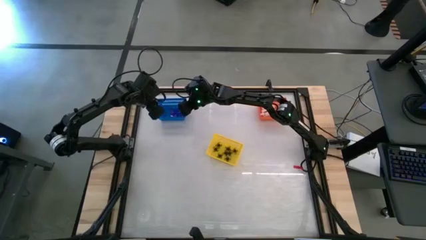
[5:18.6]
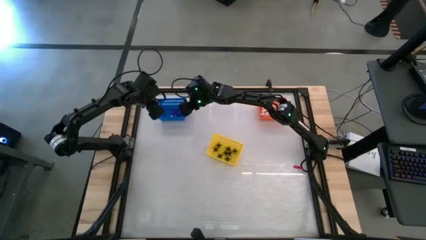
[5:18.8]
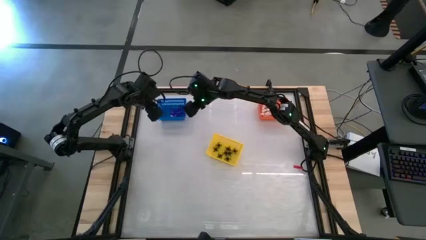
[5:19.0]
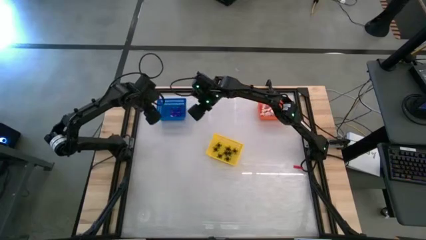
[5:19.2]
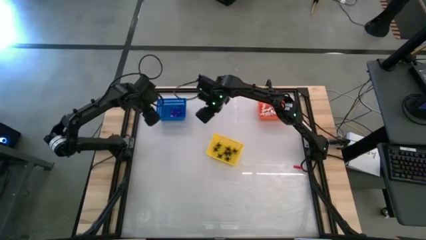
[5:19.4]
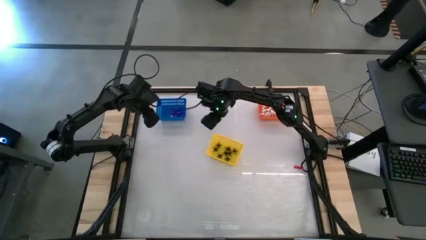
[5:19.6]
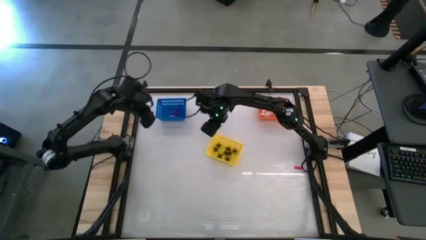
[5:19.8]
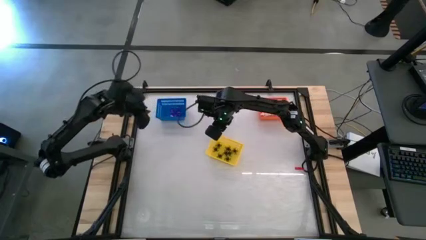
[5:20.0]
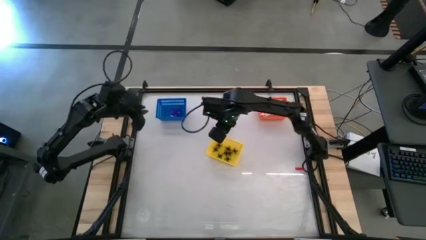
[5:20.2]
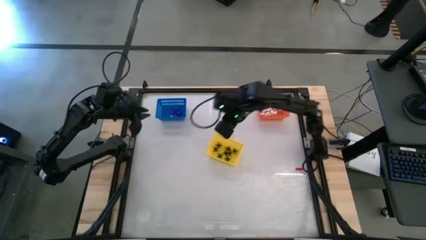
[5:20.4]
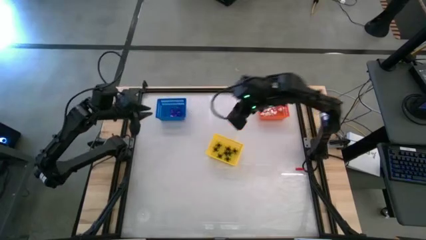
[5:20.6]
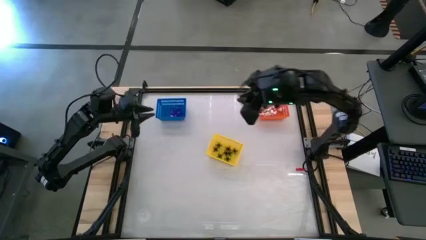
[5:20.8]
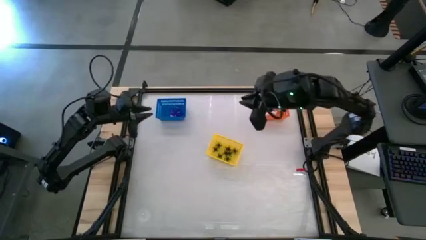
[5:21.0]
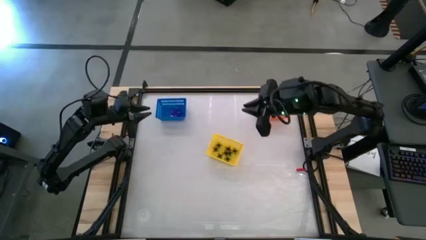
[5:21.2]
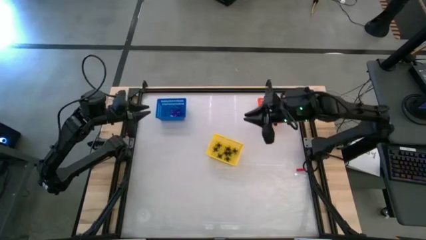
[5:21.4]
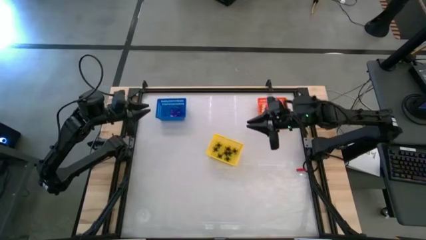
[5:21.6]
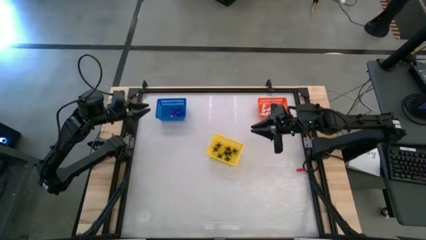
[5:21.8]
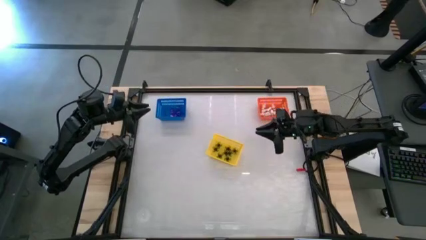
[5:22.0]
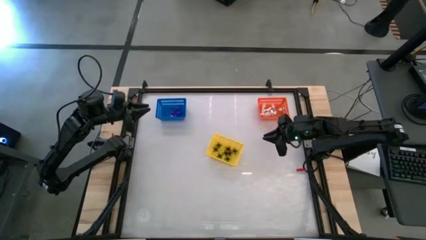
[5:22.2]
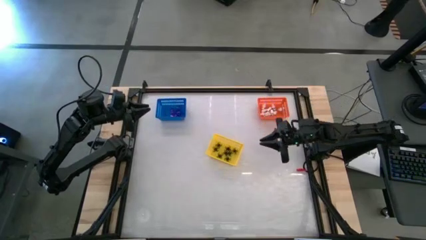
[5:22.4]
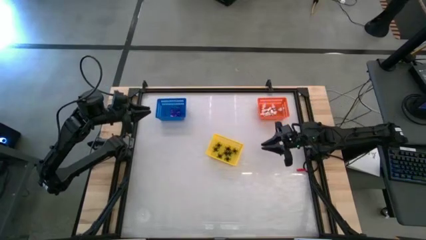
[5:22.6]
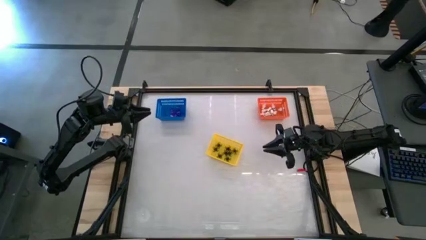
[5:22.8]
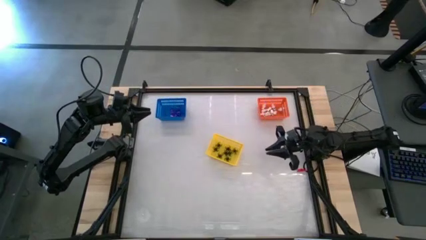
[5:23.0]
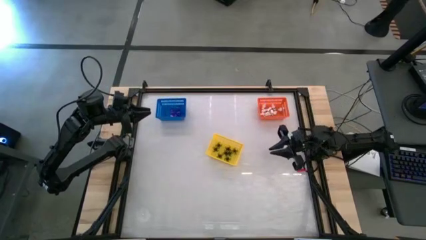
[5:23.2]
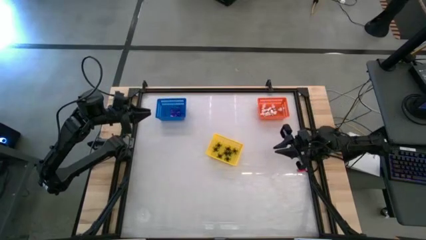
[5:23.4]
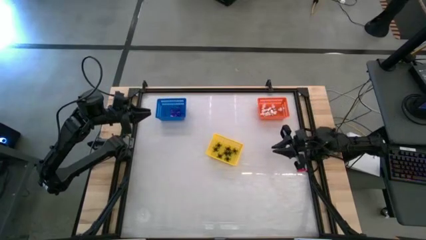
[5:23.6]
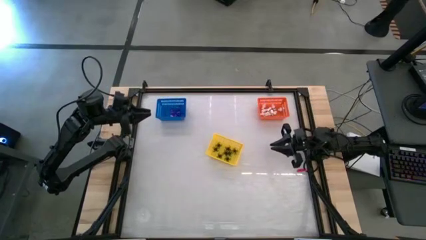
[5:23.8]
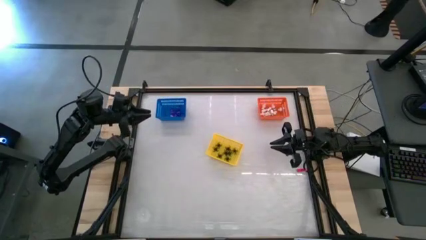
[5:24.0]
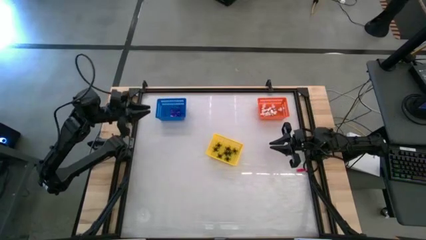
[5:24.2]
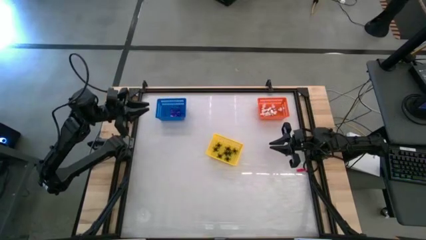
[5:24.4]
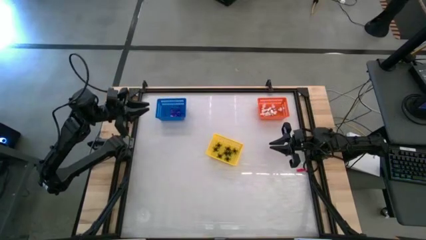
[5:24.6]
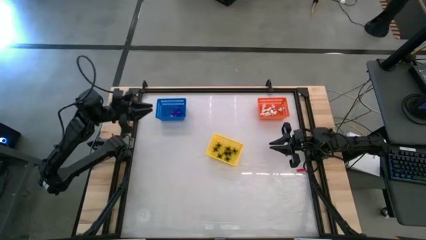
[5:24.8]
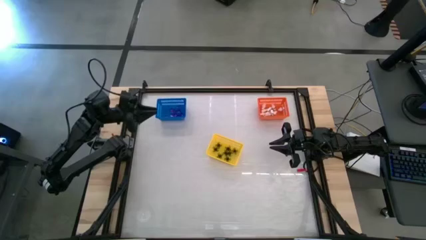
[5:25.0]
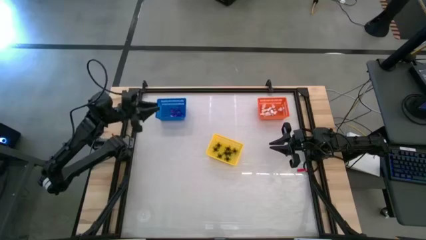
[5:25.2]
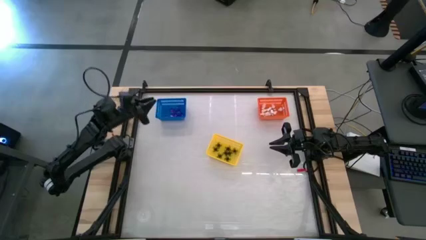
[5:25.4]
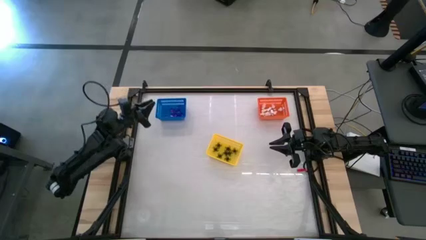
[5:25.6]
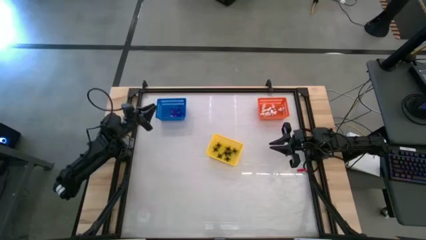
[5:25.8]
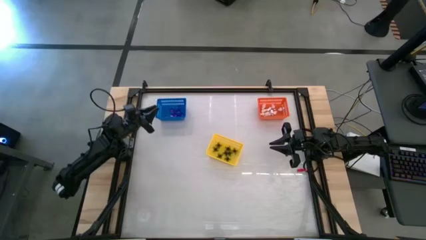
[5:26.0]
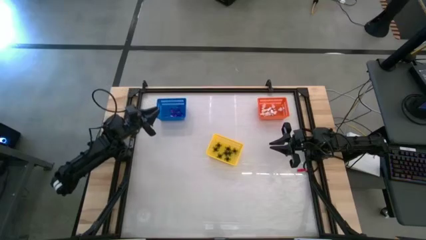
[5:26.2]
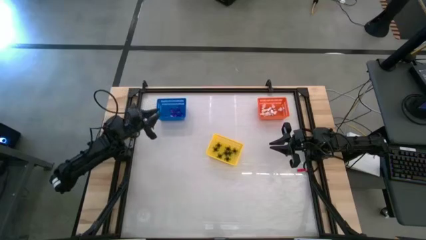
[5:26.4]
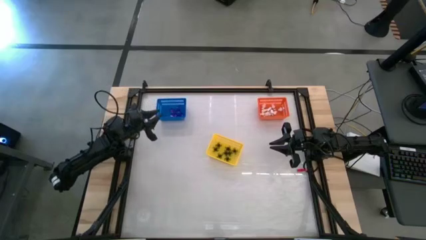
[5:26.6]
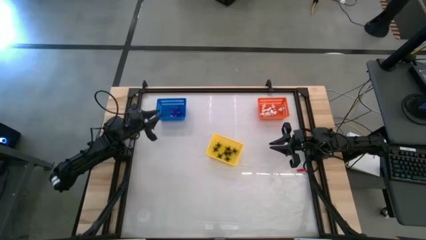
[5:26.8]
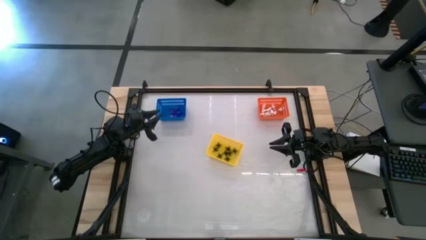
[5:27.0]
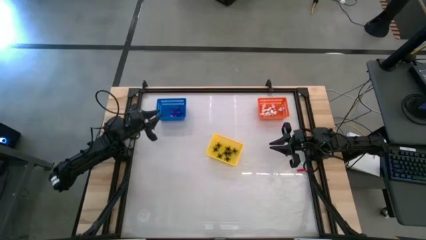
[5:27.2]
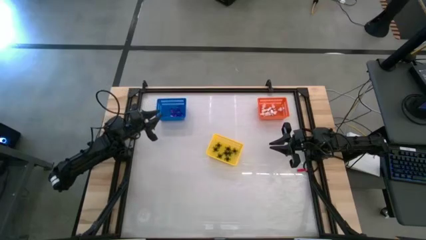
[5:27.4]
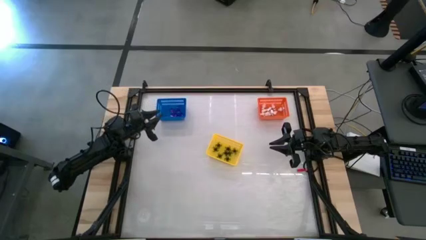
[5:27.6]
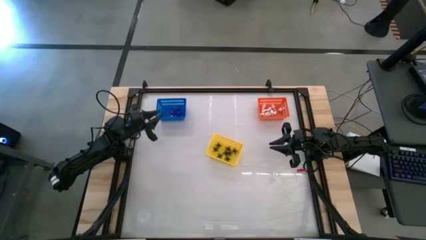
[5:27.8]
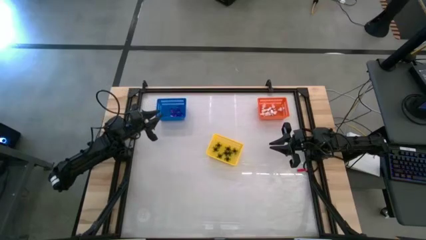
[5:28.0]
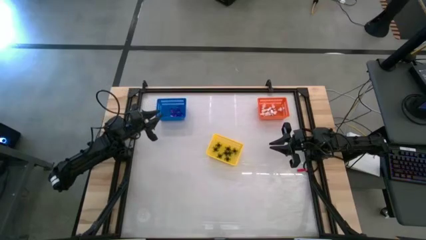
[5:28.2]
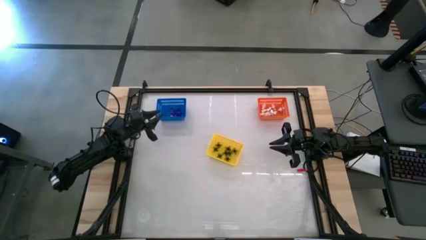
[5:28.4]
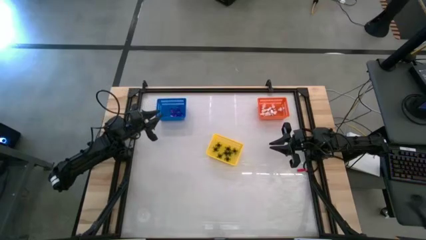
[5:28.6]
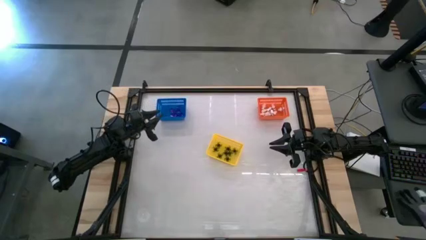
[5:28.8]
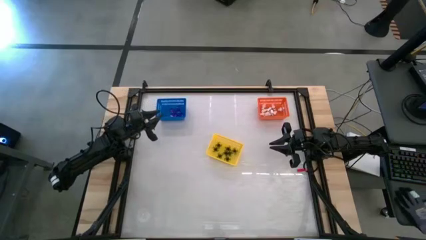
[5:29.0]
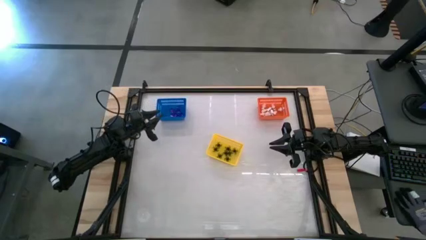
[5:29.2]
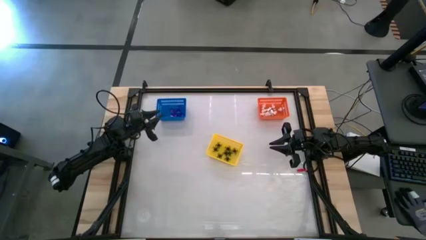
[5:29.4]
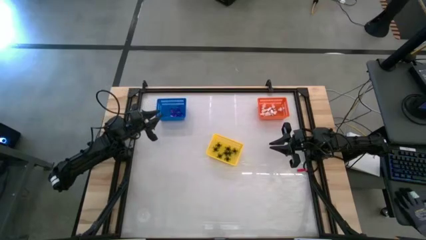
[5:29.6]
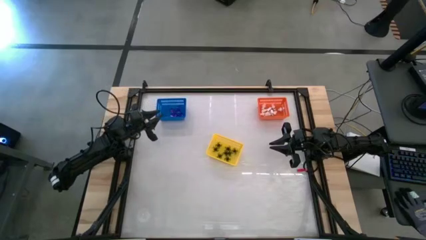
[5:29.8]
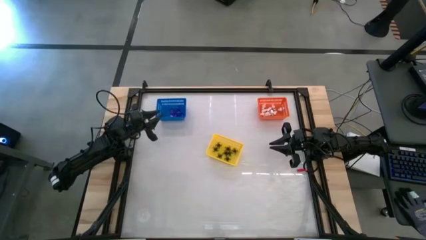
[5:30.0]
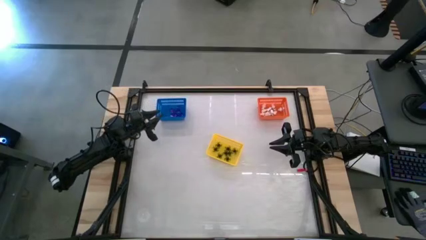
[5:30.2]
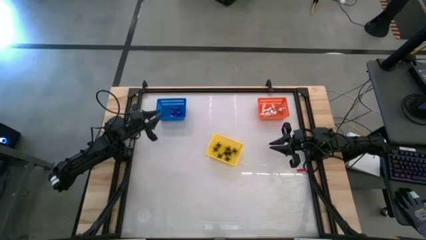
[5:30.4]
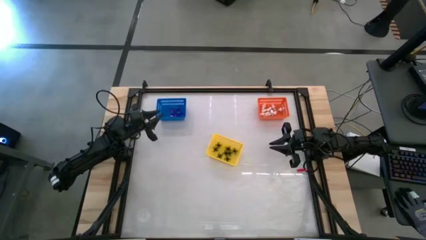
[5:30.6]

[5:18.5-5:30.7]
Task: Sort Halloween decoration
Return to Home Position

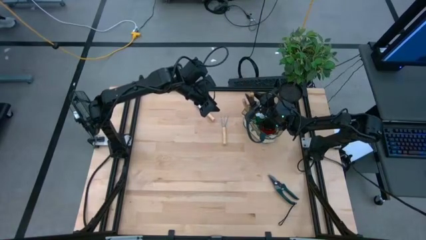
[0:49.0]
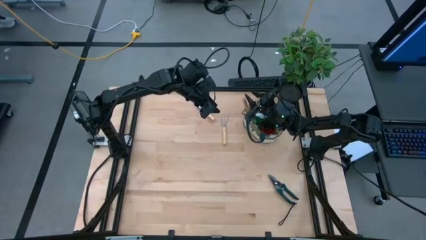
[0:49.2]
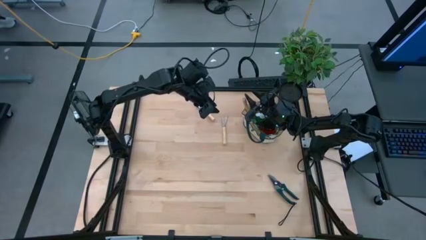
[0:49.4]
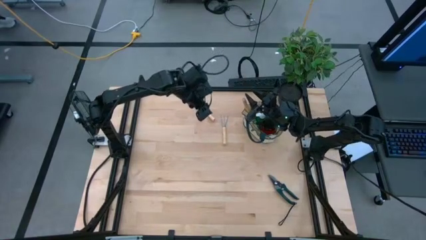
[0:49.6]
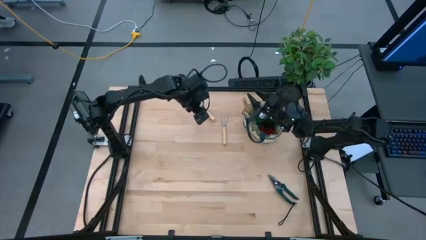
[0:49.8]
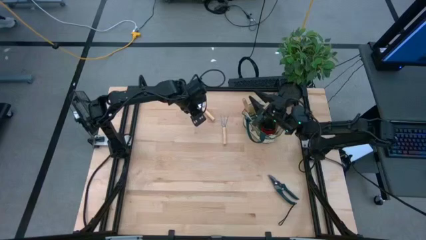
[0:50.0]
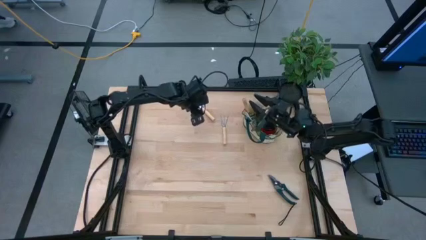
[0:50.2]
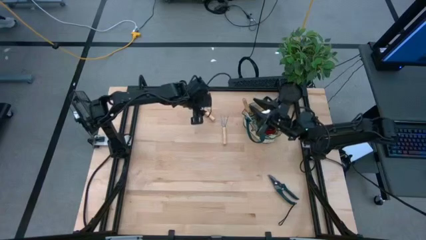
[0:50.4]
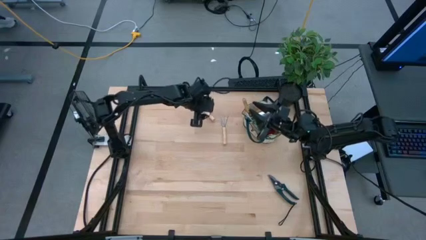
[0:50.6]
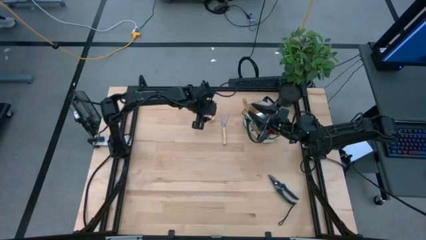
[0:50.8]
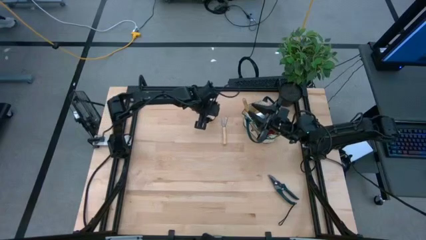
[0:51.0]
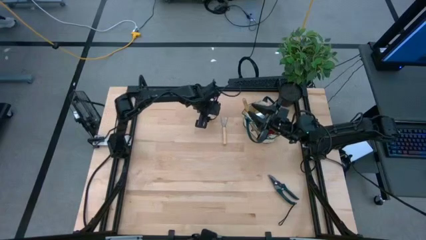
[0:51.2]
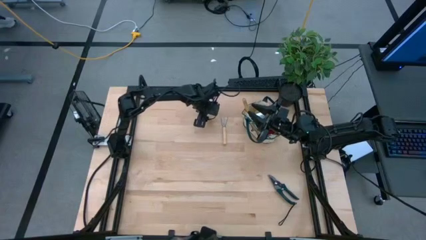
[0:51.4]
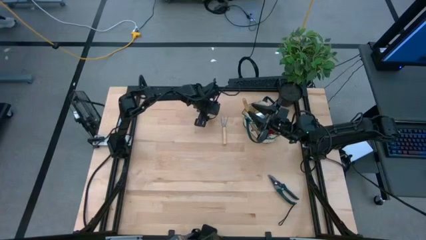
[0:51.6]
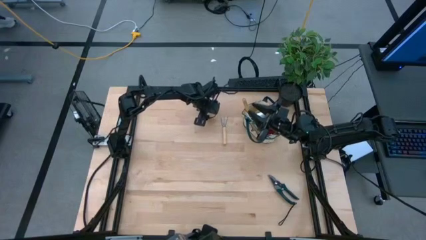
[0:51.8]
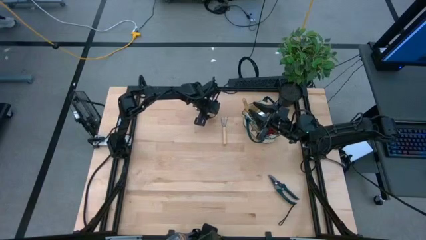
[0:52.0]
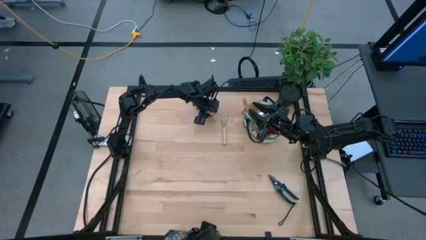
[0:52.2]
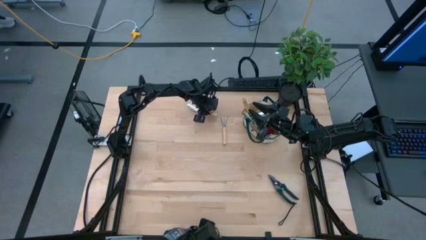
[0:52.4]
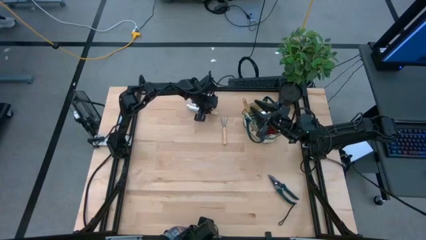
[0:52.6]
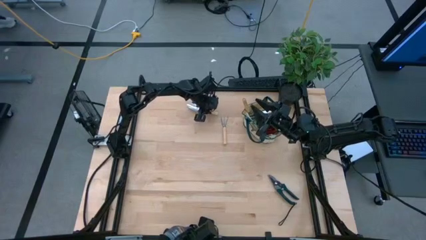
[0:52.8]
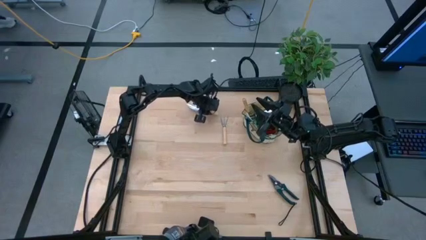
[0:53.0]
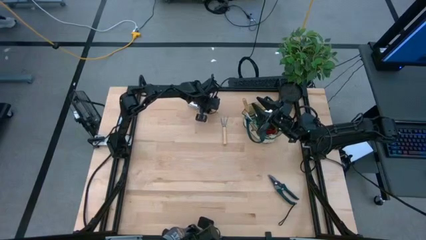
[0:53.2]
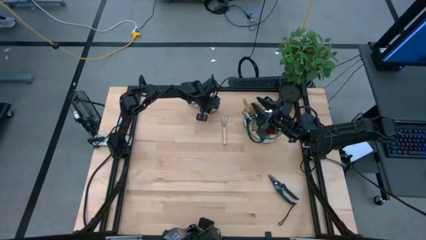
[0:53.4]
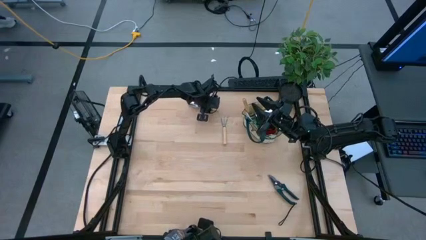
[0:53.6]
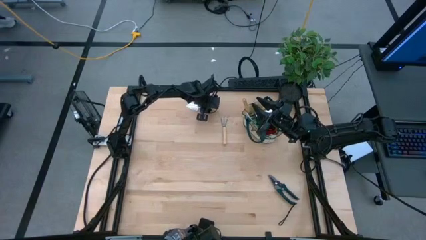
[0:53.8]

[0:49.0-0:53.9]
Task: Pick & Place Garden tools in Gardening bag
Put the brown trowel into the gardening bag
